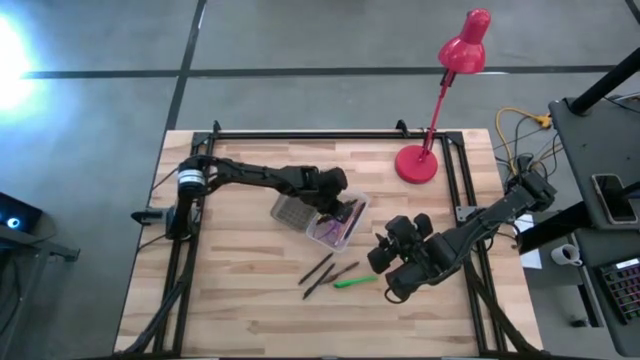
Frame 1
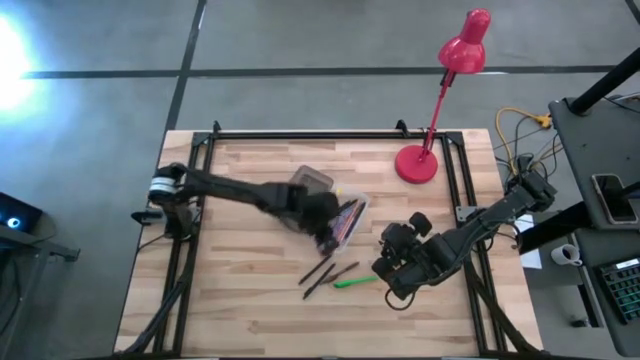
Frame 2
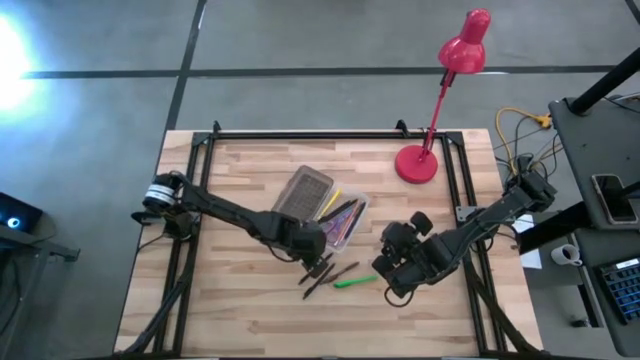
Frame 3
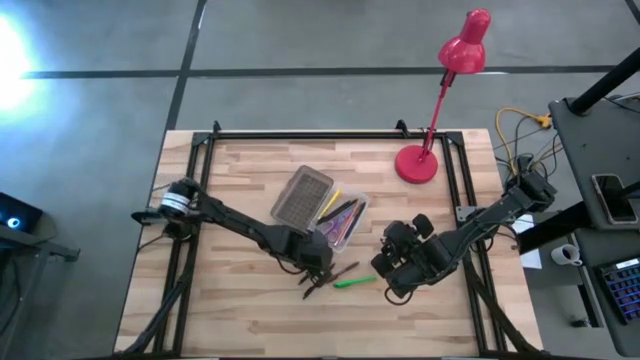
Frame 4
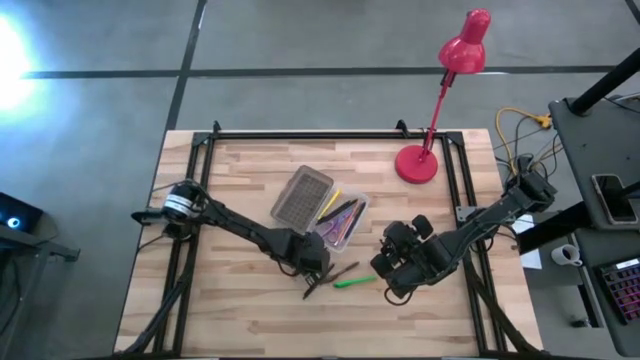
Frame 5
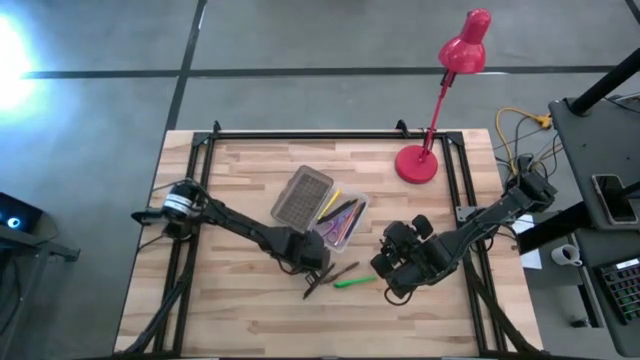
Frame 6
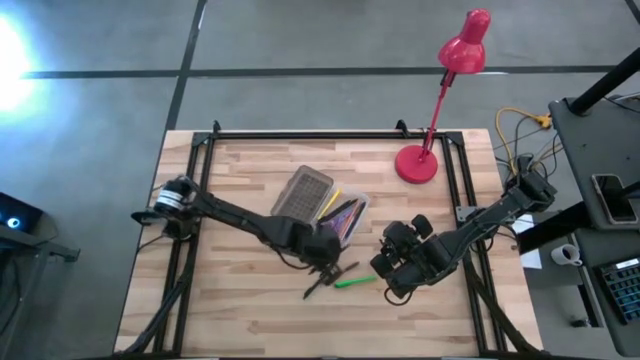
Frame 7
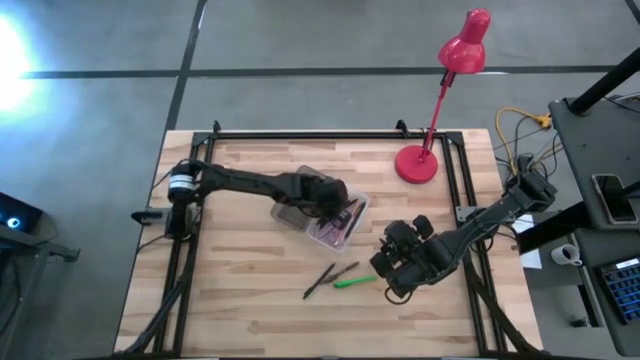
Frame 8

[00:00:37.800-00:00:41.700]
Task: Pick & place school supplies into a supply box
Put the black pen into the gray supply box

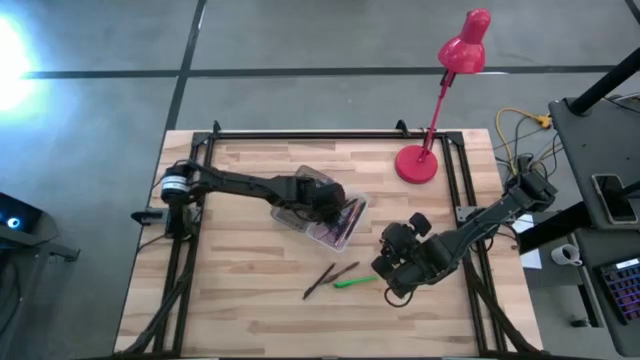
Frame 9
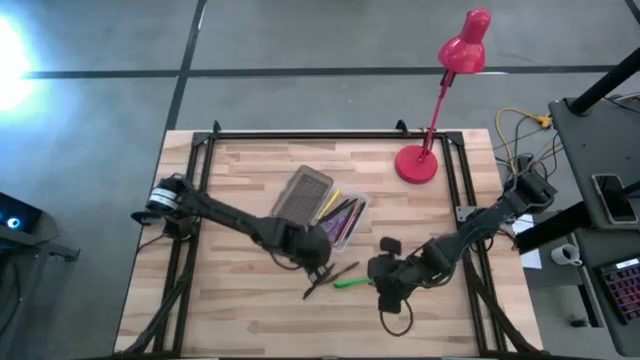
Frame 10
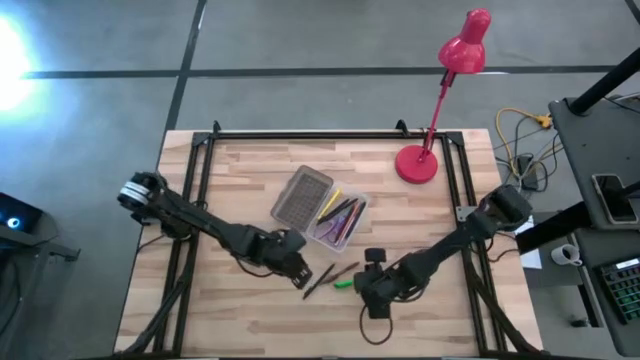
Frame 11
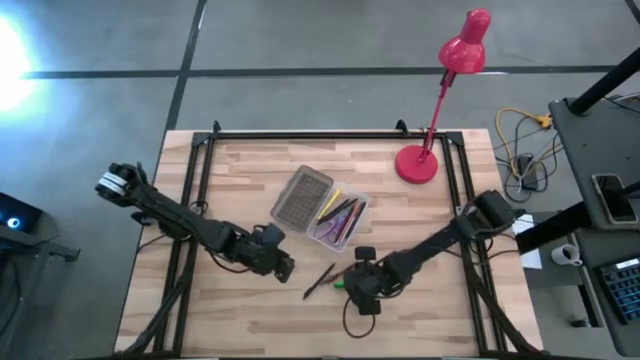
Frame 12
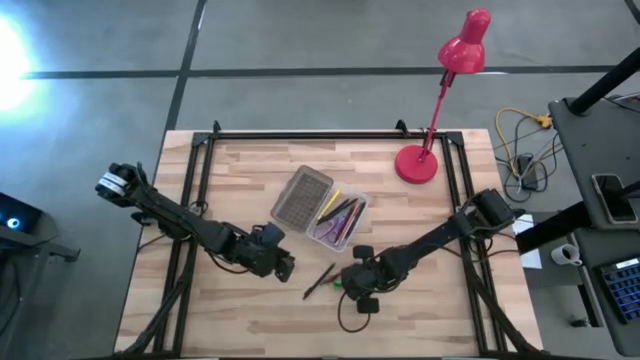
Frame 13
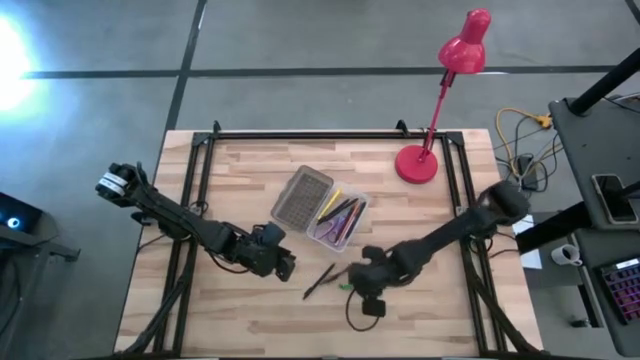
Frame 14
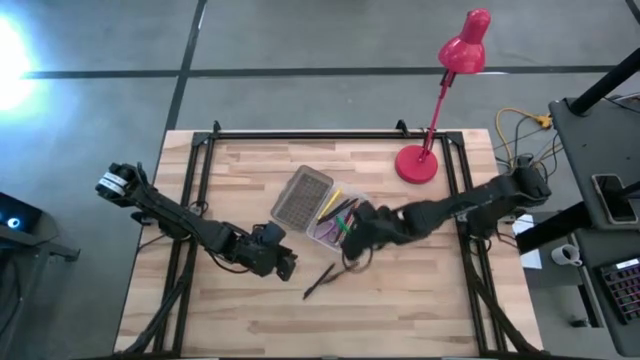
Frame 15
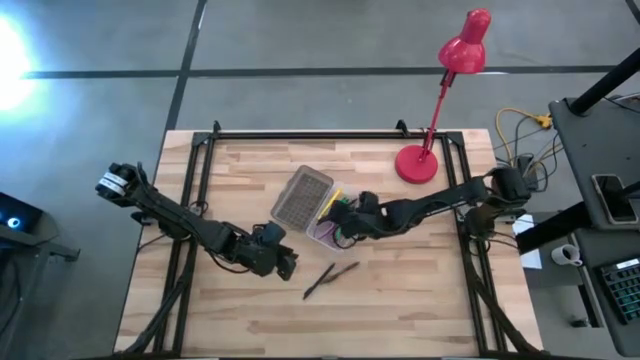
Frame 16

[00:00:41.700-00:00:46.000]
Put the green pen into the gray supply box

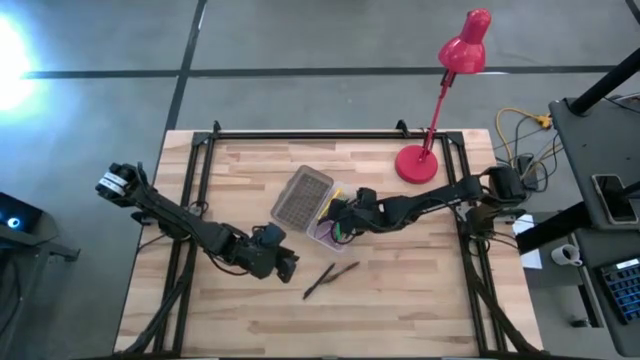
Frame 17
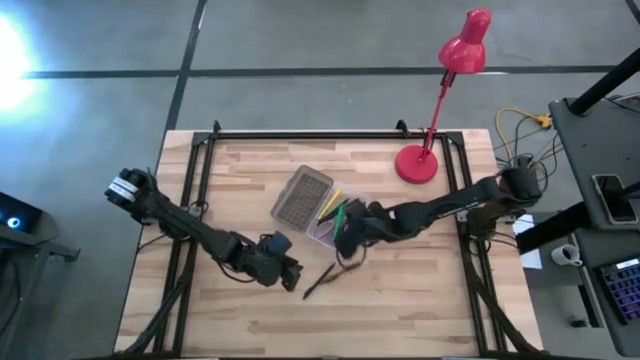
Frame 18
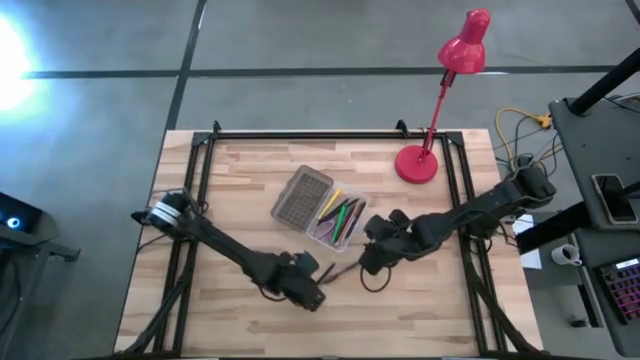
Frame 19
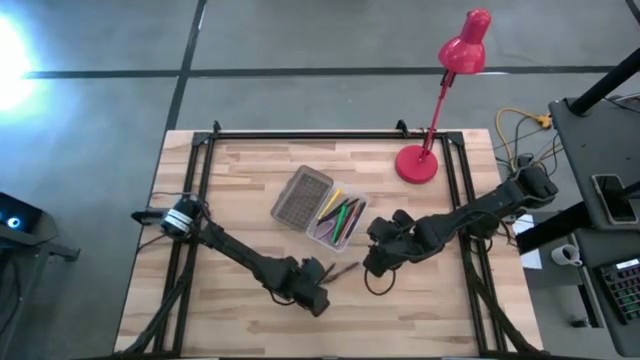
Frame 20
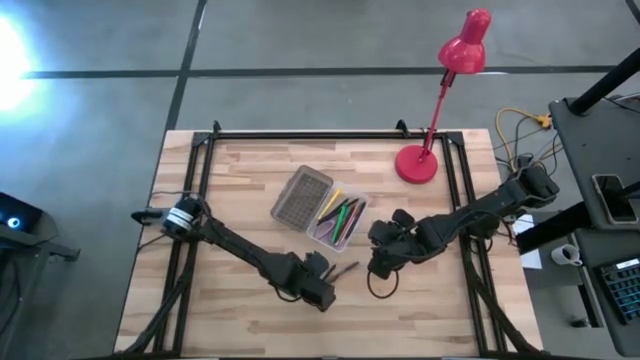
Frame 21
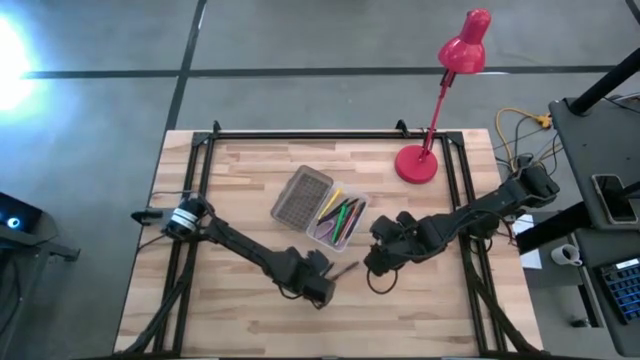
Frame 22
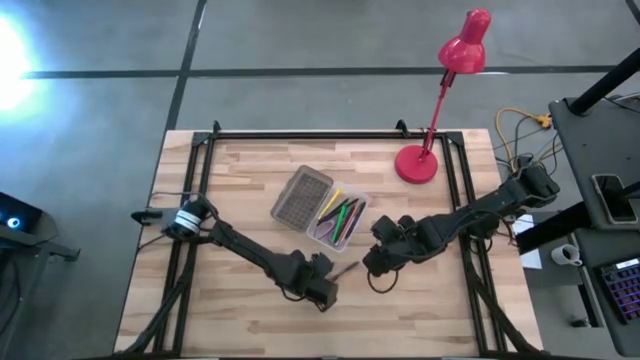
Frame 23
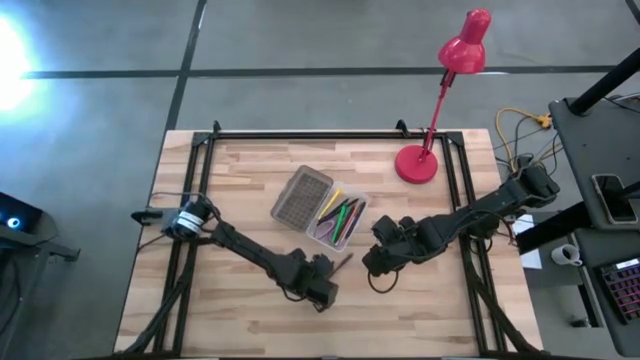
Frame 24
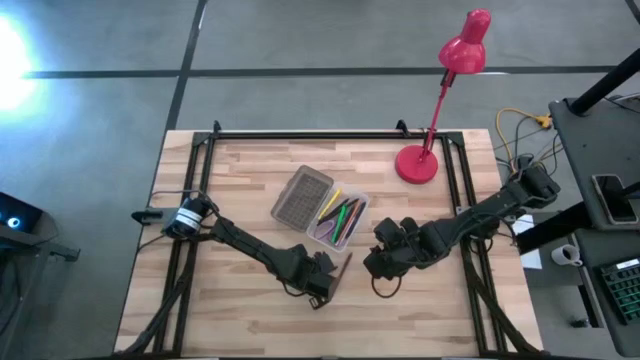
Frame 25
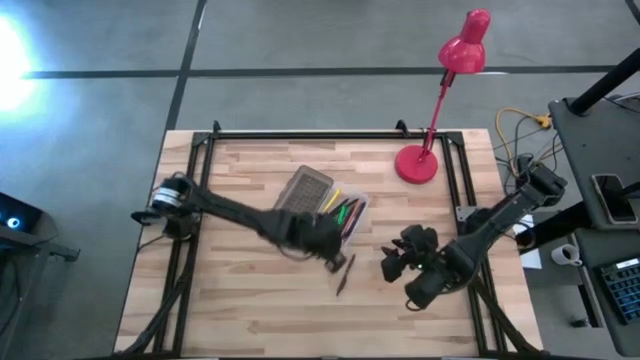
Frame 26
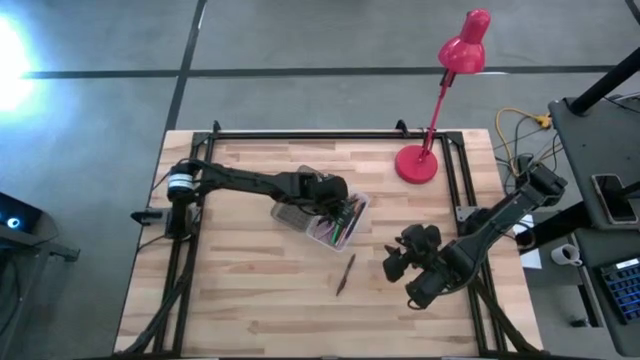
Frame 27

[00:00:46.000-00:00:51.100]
Put the black pen into the gray supply box

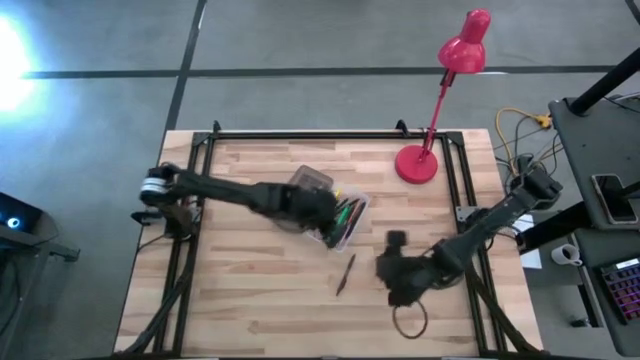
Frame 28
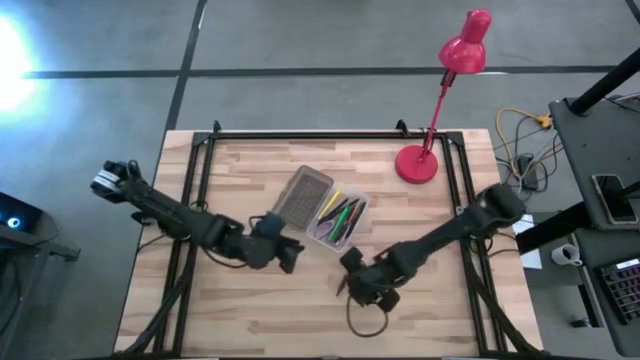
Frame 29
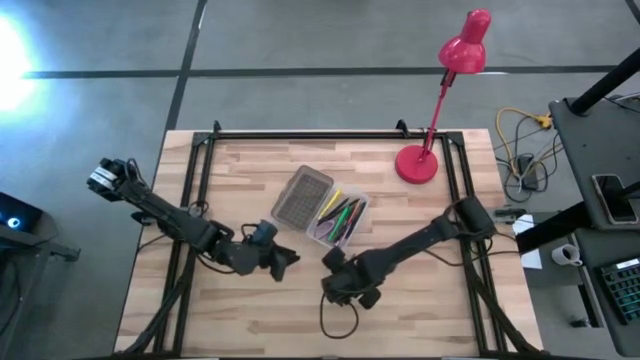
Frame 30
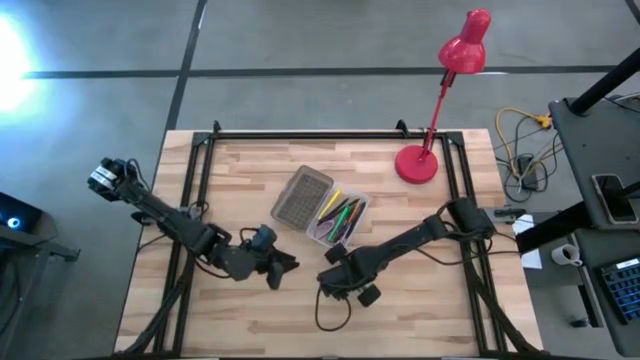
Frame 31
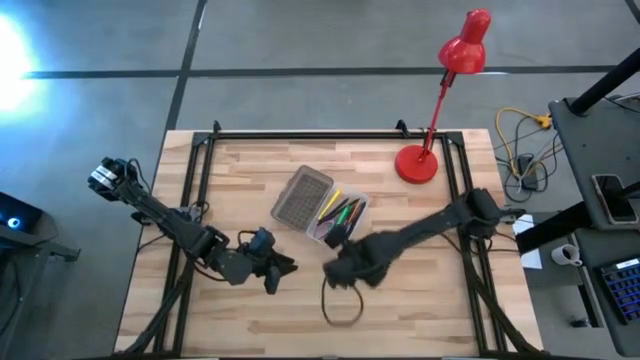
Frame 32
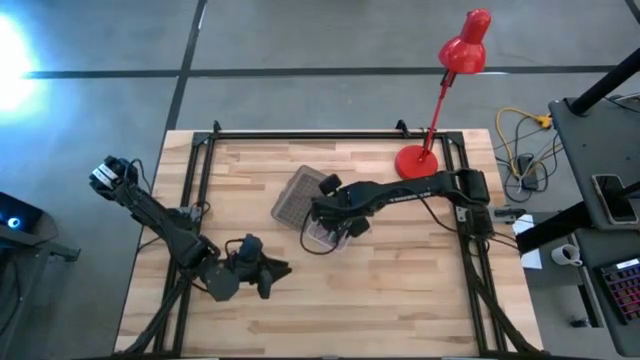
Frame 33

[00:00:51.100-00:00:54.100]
Put the brown pen into the gray supply box

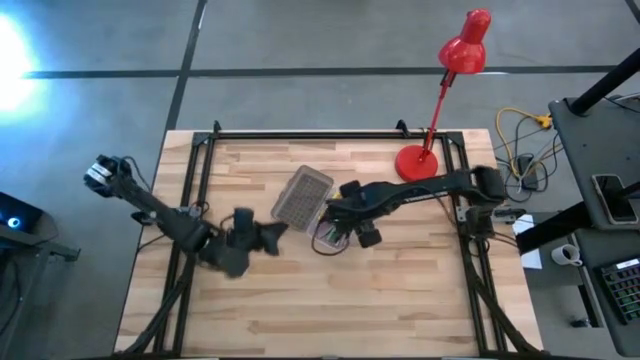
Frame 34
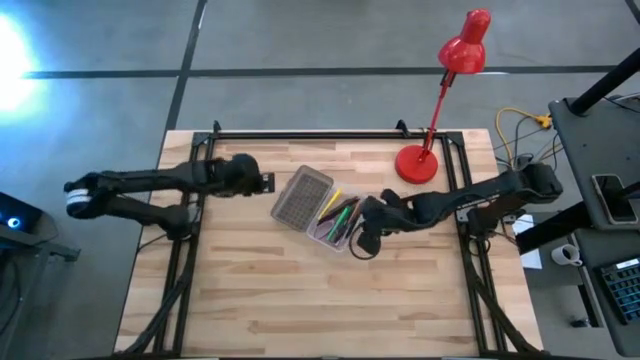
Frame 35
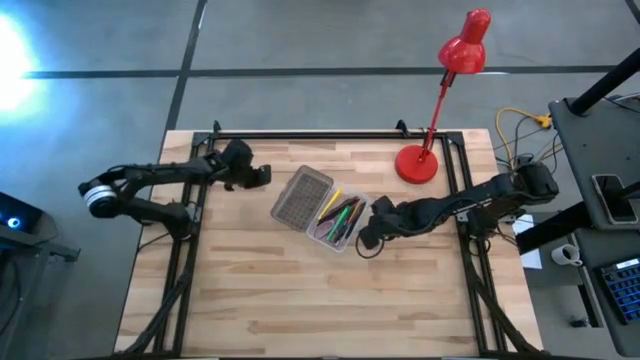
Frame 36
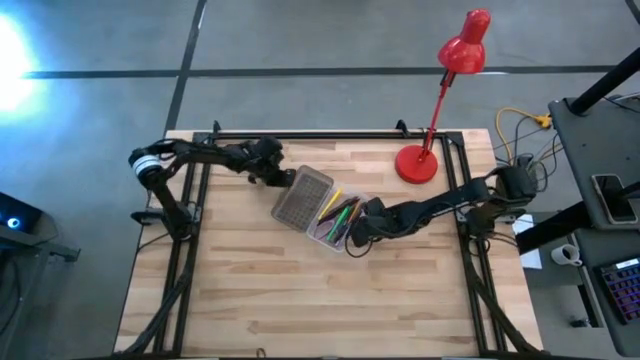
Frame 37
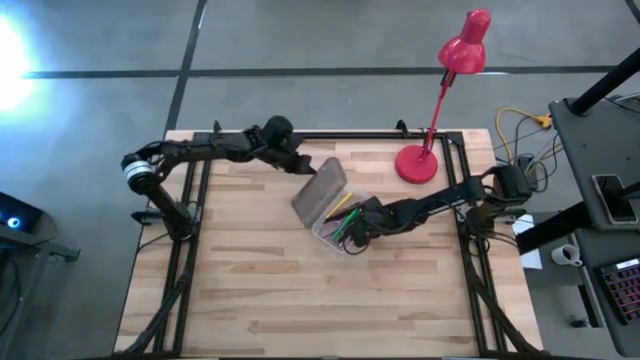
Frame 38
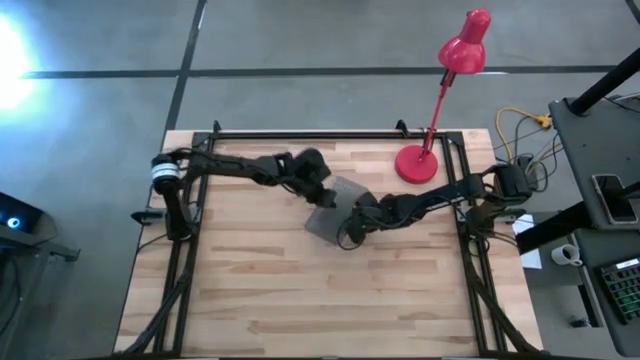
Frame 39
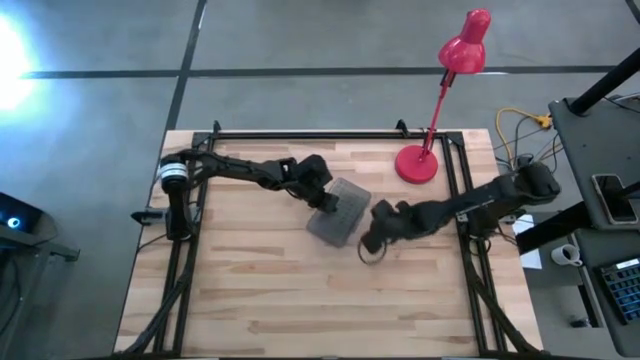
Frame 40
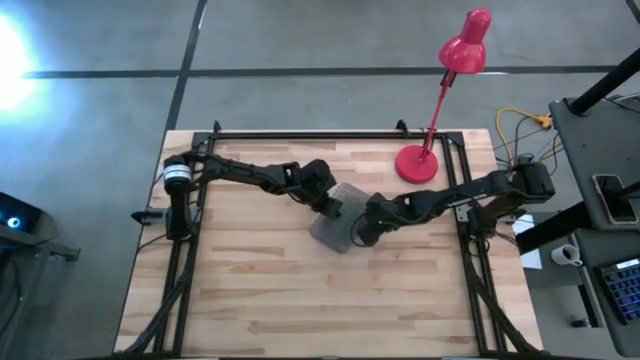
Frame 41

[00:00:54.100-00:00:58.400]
Close the gray supply box
